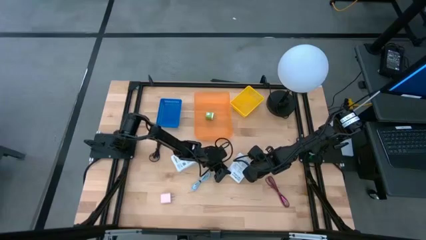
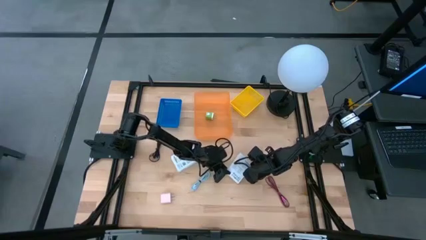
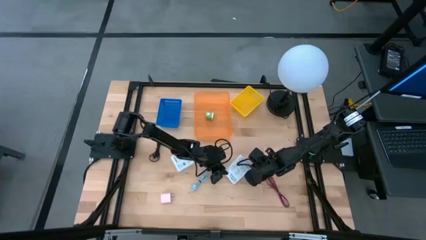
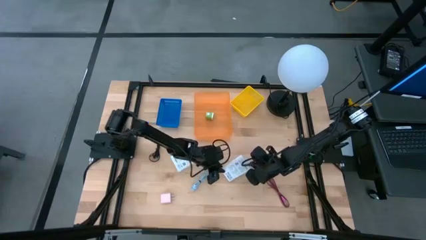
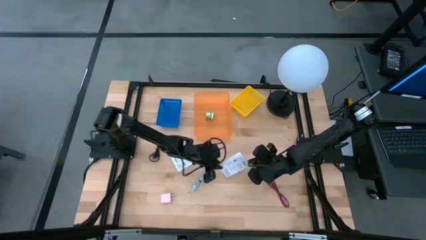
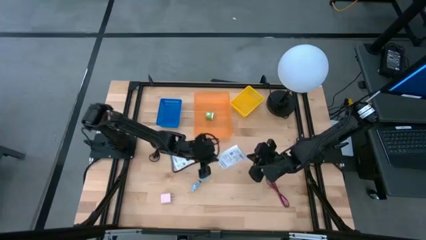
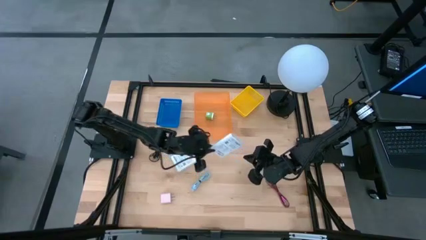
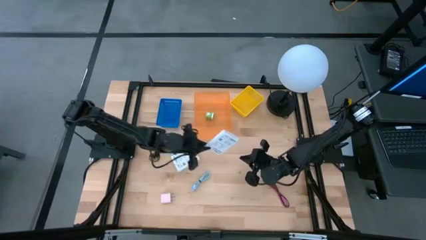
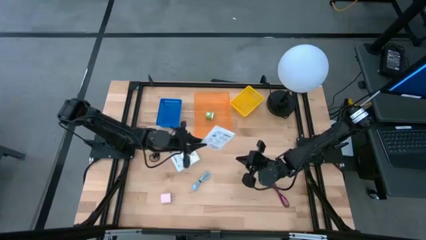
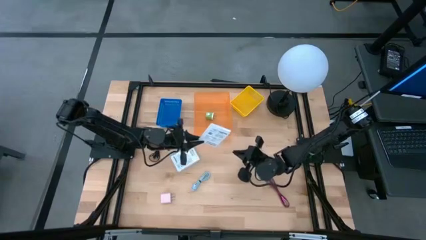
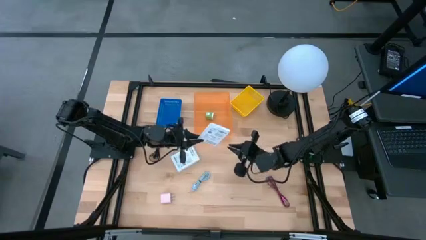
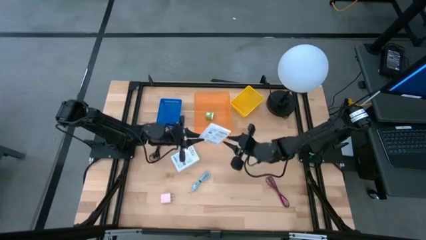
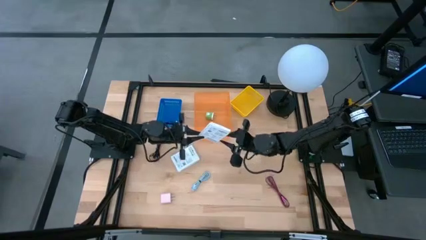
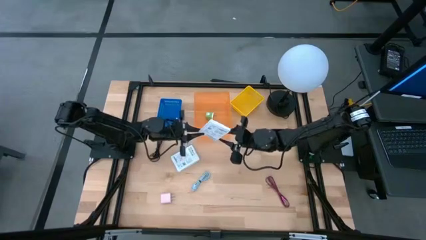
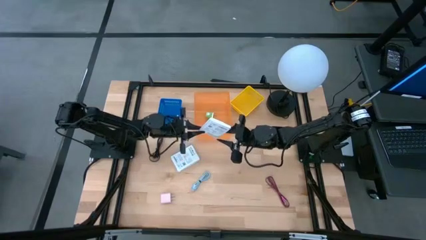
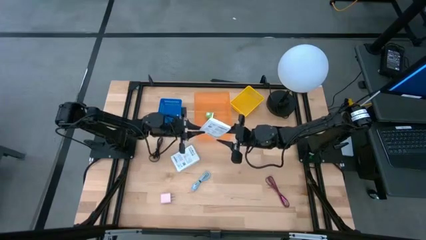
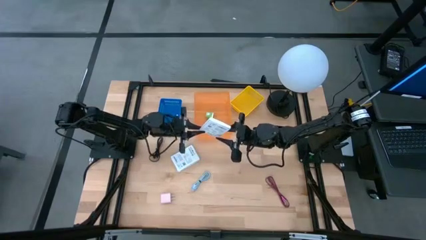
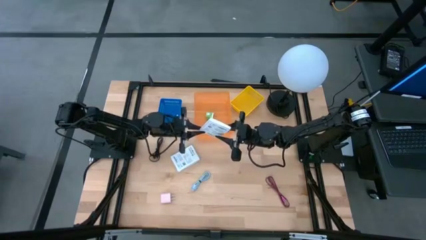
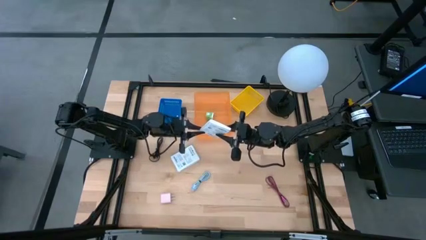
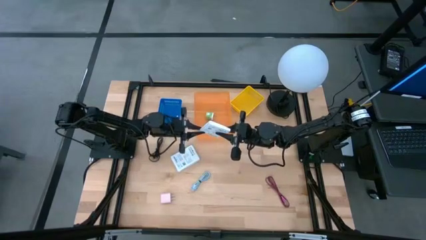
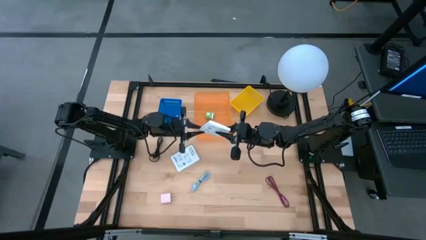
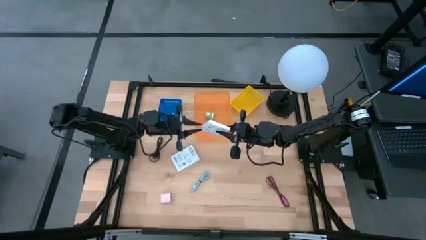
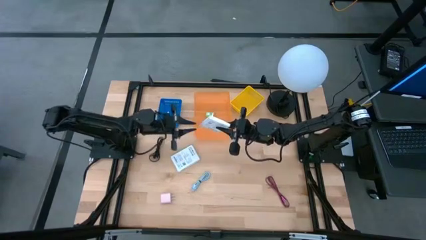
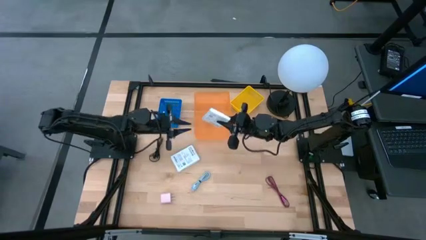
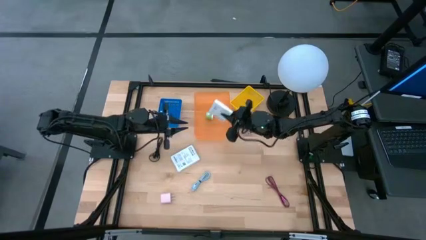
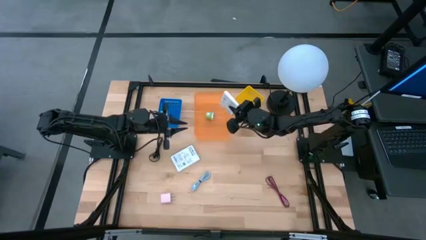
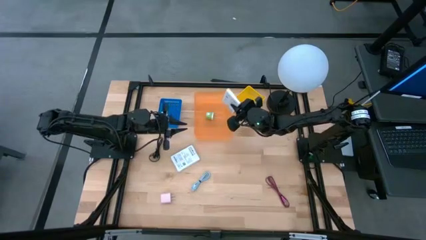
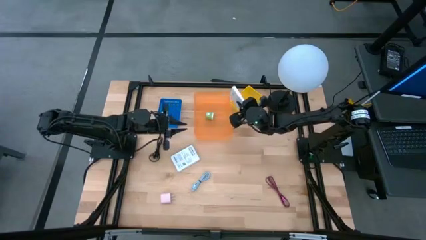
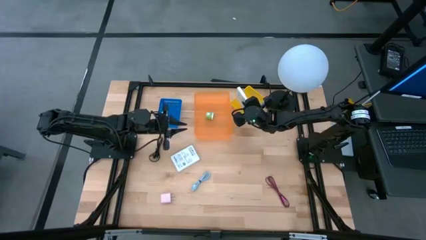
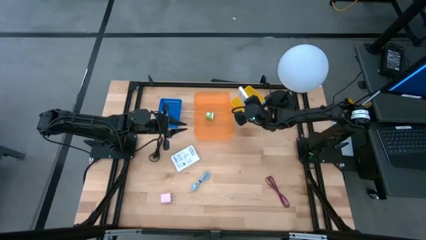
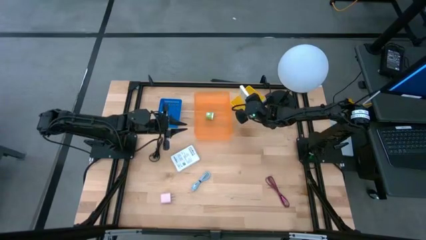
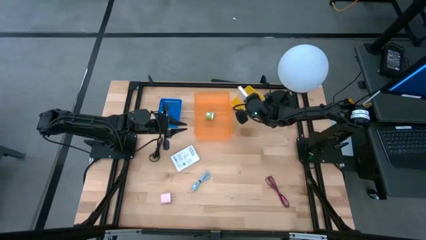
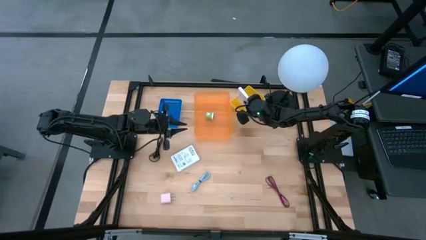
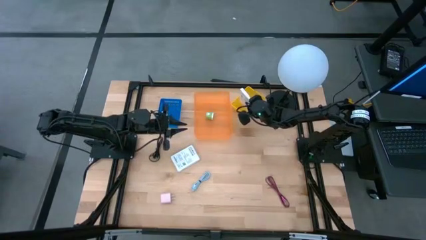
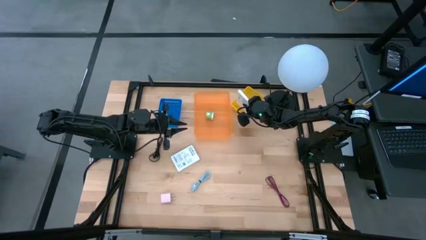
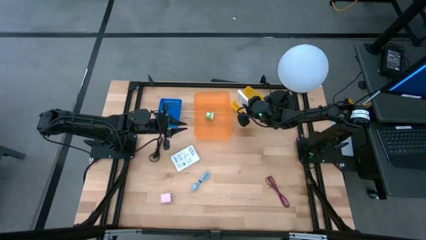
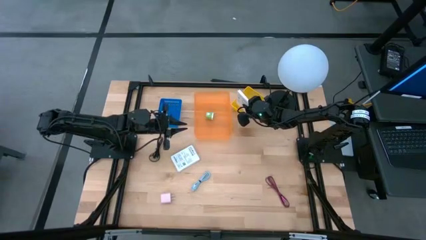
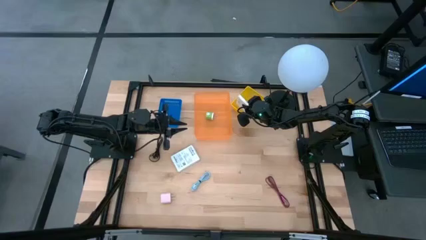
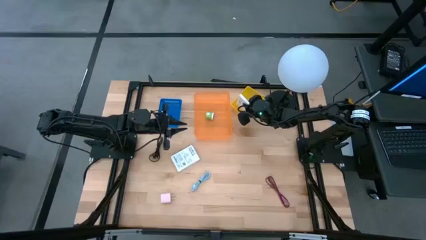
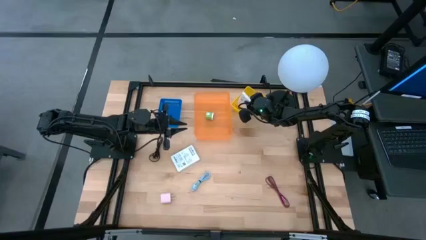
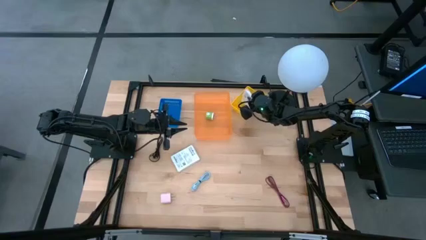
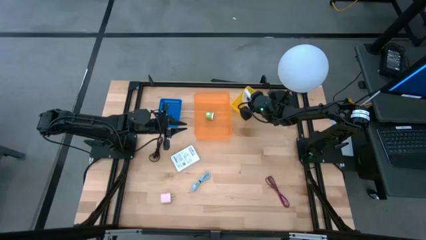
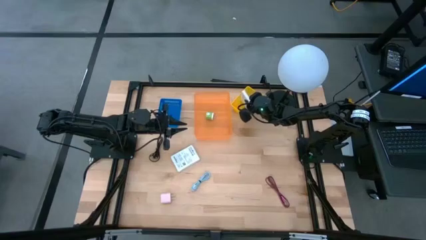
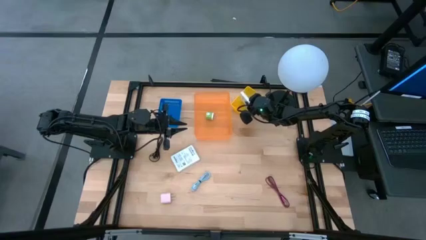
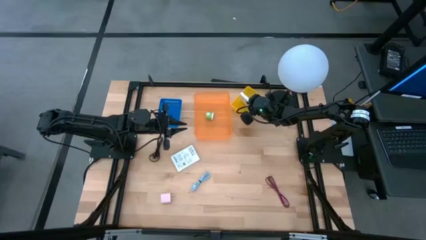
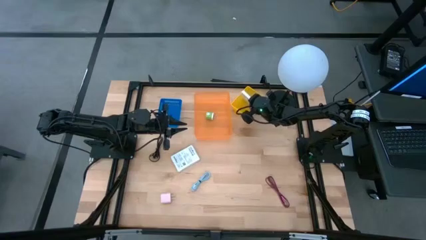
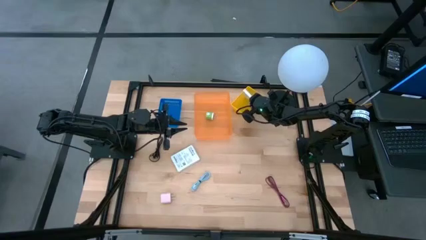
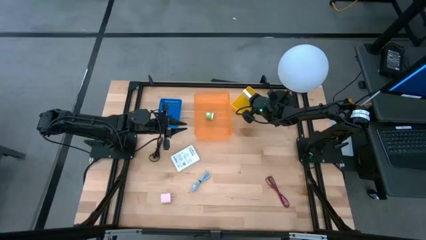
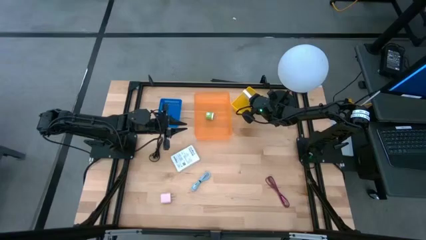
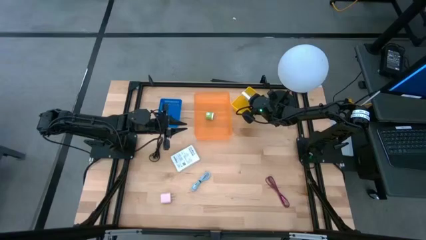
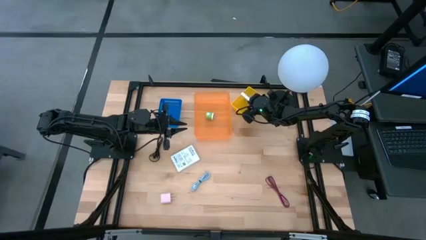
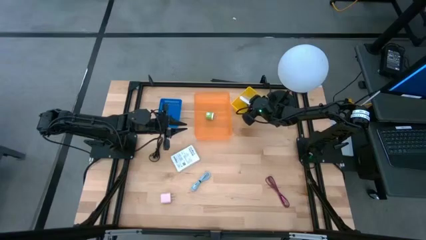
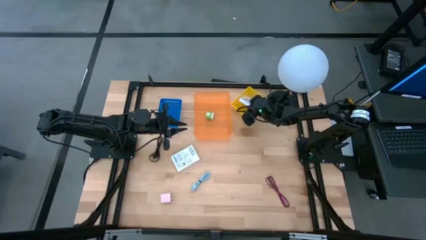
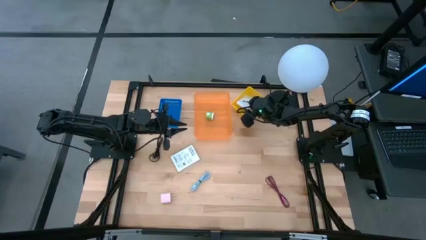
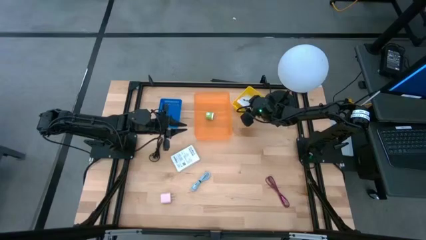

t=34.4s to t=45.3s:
Task: Pick and place items into bin
Put the right card reader box into the yellow basket
